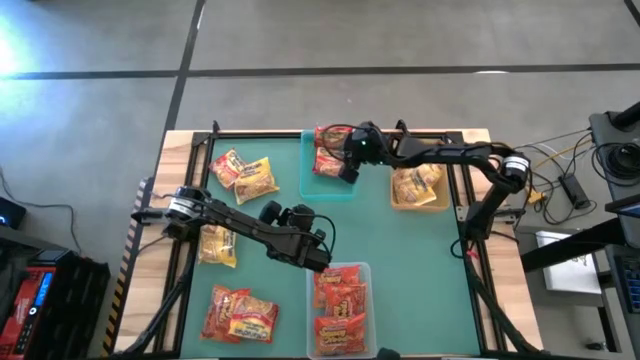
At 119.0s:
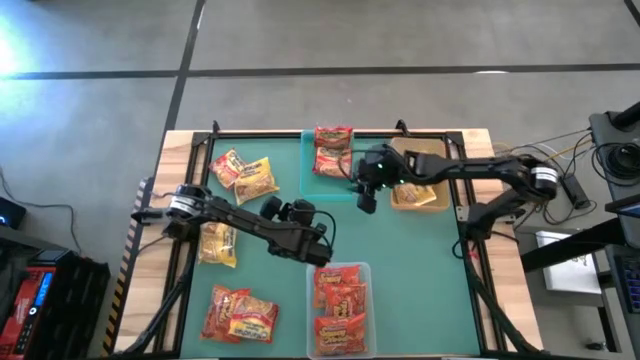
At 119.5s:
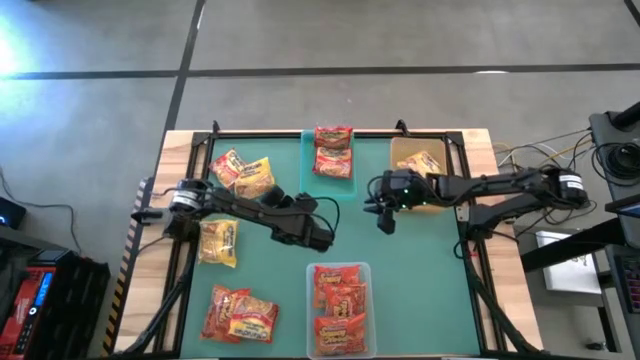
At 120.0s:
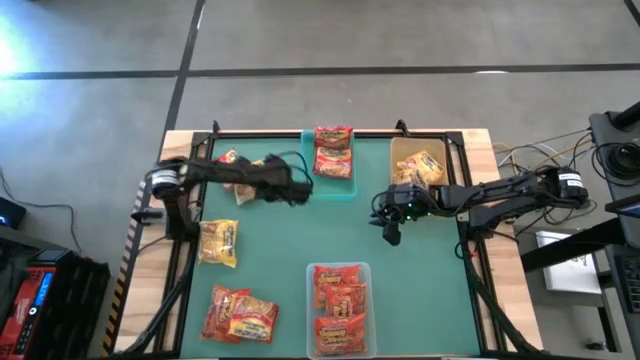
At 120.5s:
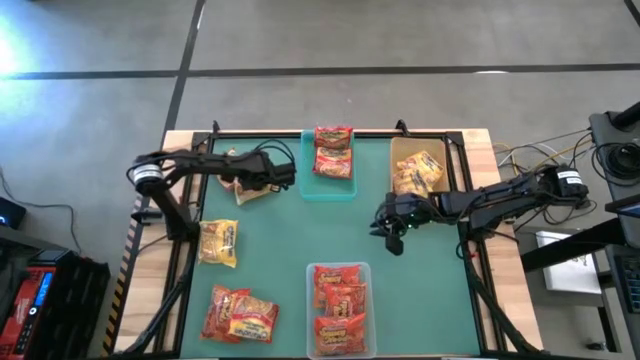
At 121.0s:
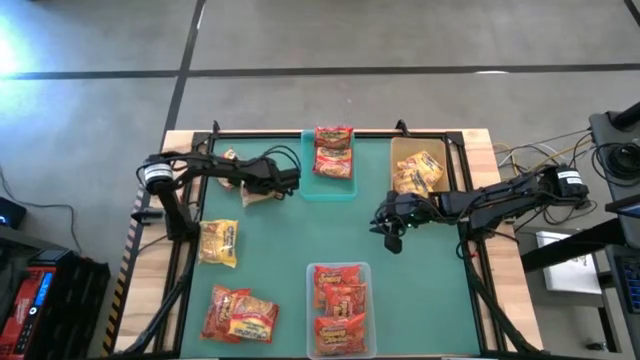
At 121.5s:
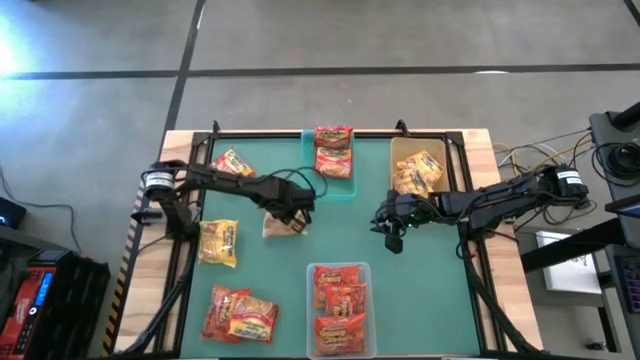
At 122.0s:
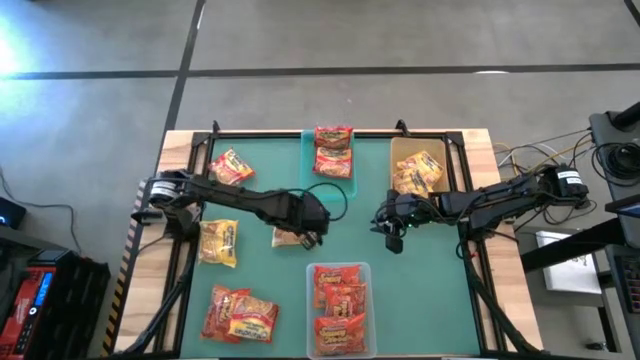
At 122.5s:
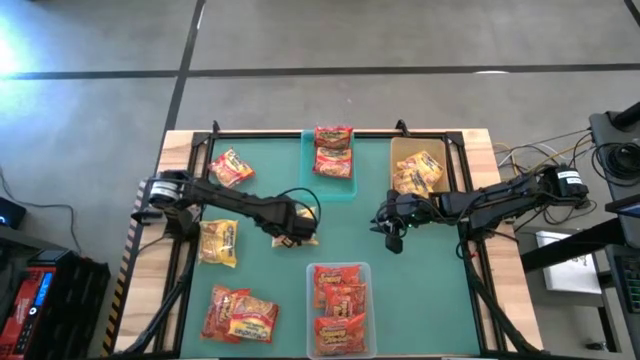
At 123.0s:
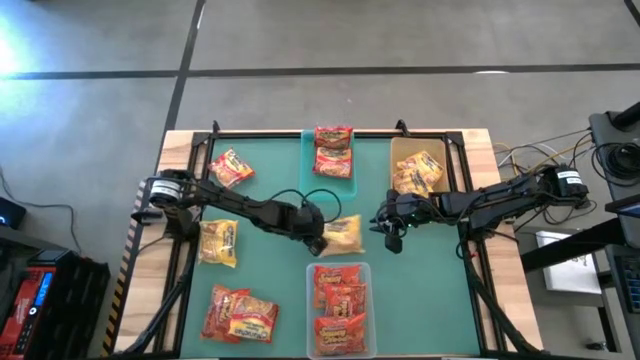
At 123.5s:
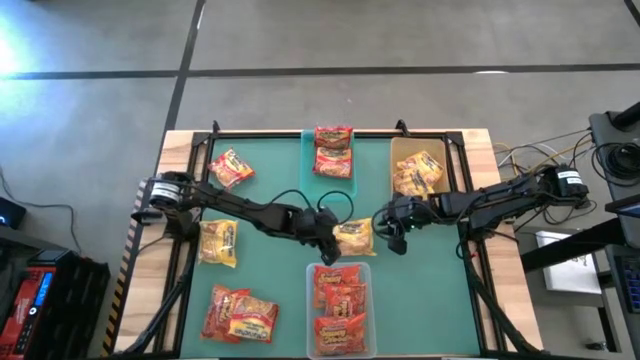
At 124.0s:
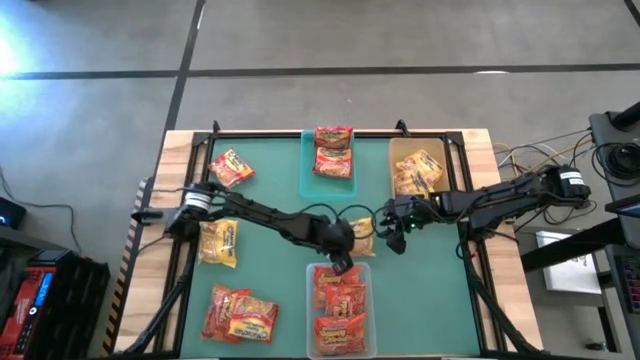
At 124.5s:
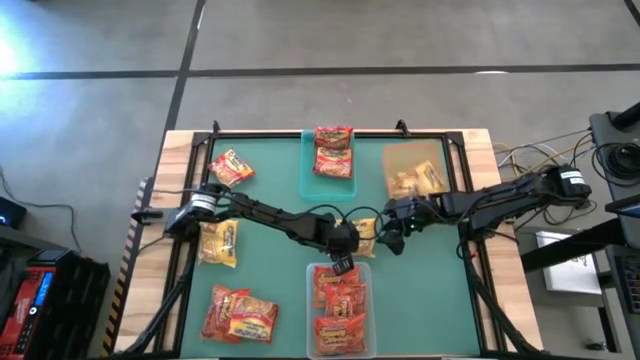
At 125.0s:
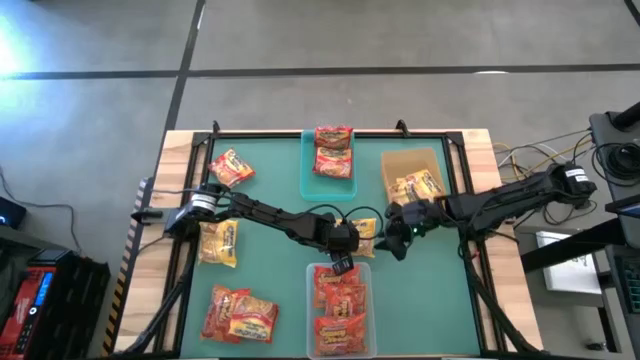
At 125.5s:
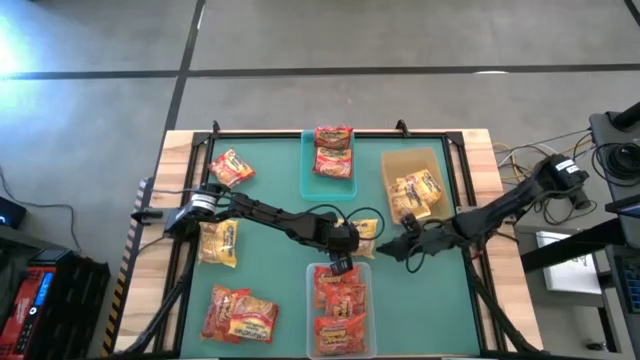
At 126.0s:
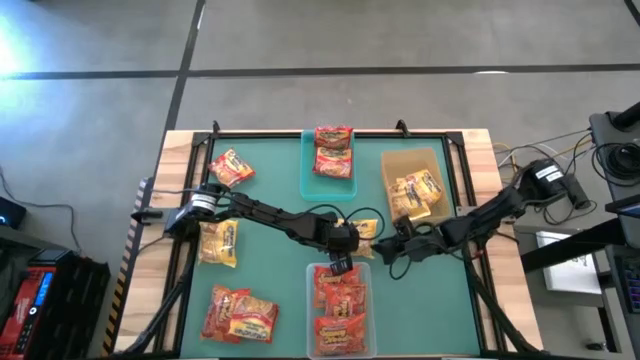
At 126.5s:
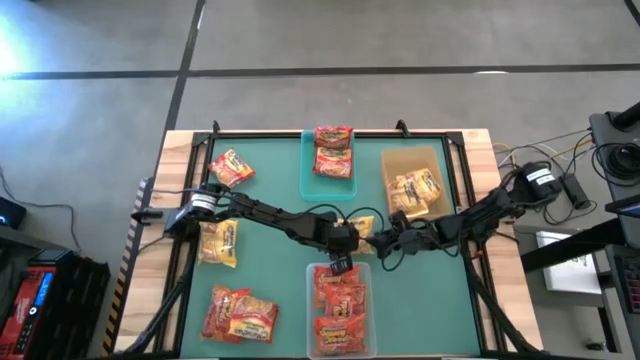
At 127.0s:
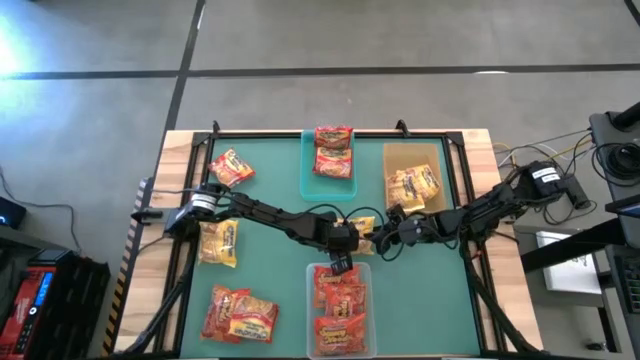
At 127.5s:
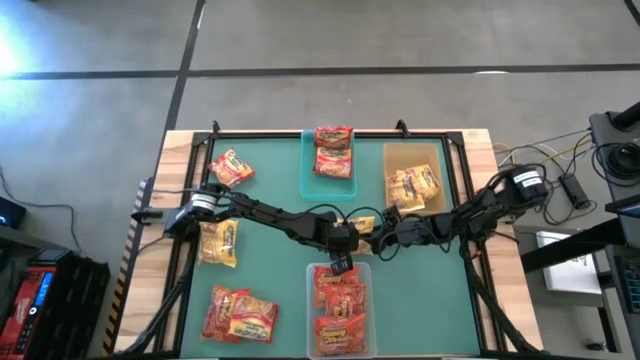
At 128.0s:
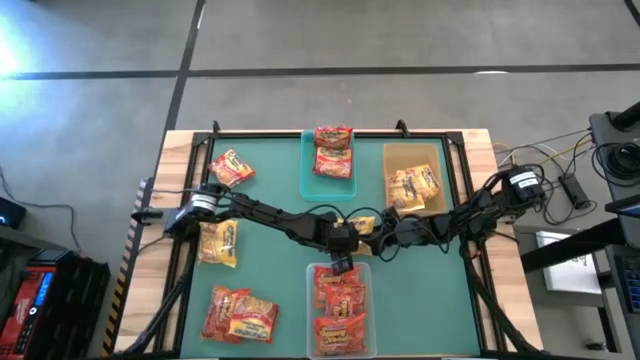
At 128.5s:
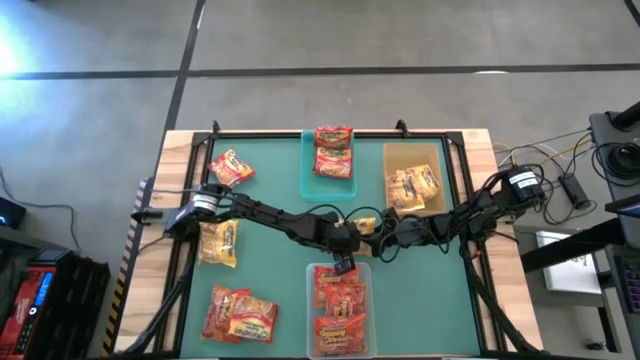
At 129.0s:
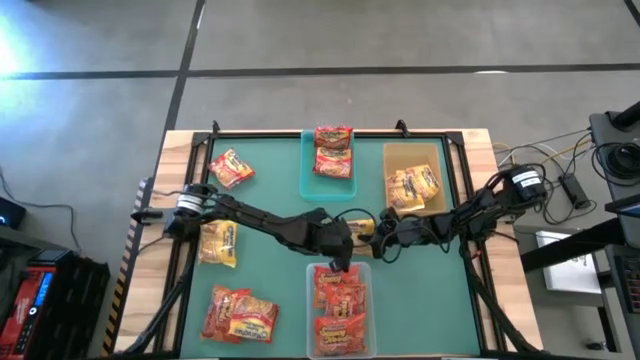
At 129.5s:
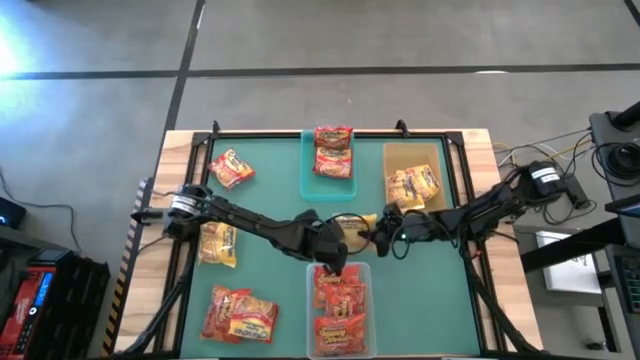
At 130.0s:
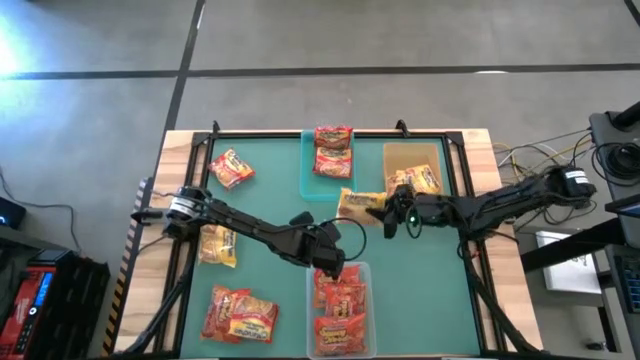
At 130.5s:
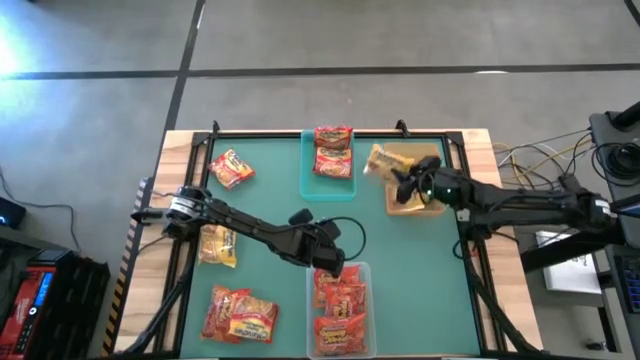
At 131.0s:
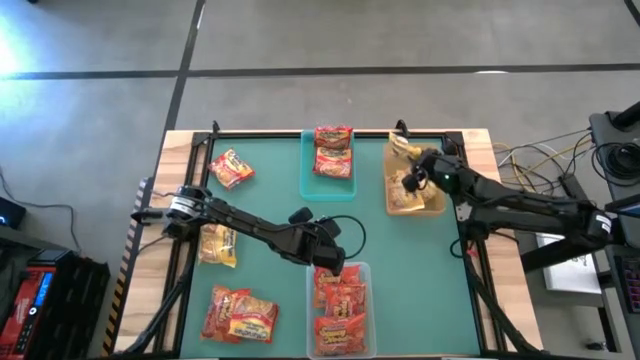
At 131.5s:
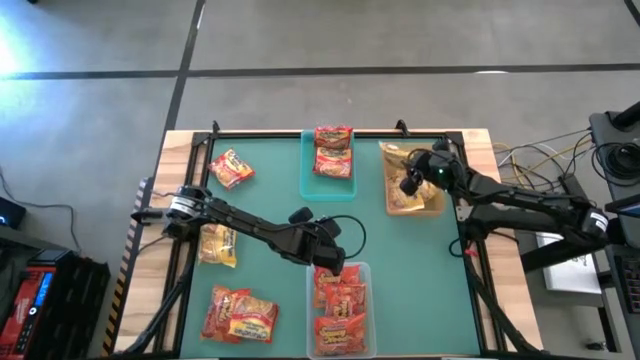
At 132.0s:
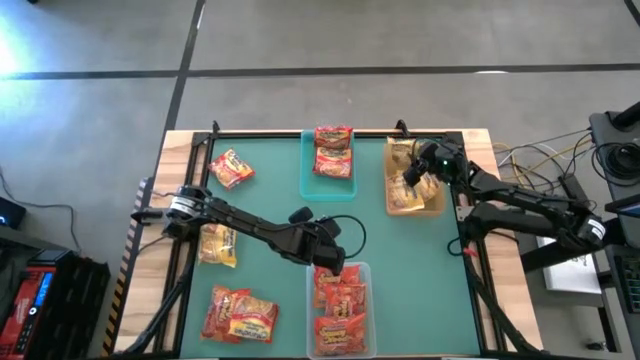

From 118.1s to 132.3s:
Task: Sort Maruchan noodles
Put the top yellow noodle pack into the transparent orange bin

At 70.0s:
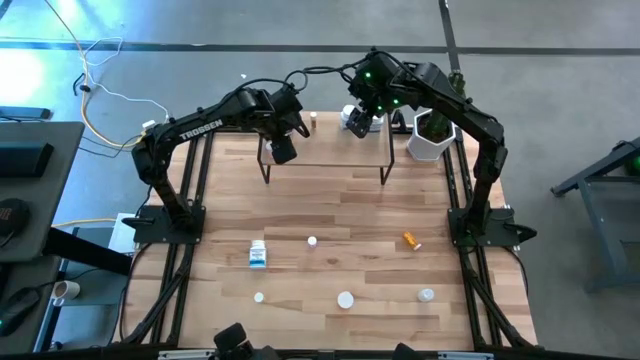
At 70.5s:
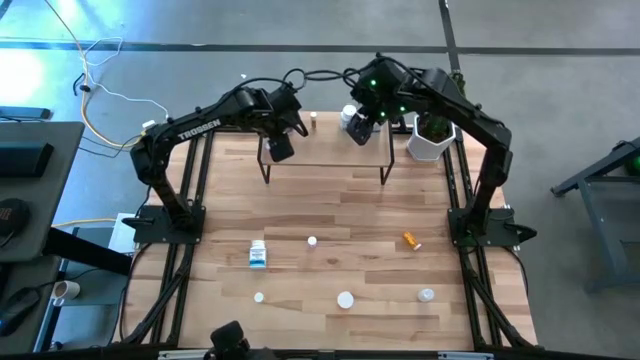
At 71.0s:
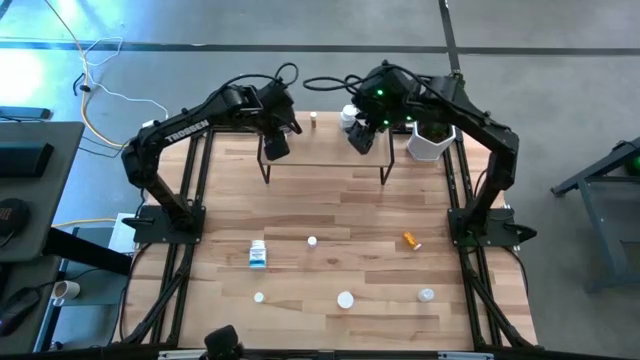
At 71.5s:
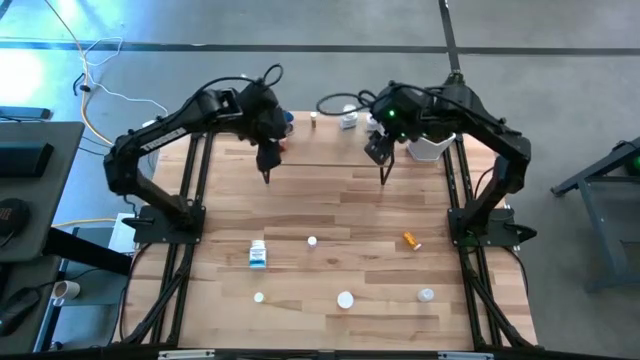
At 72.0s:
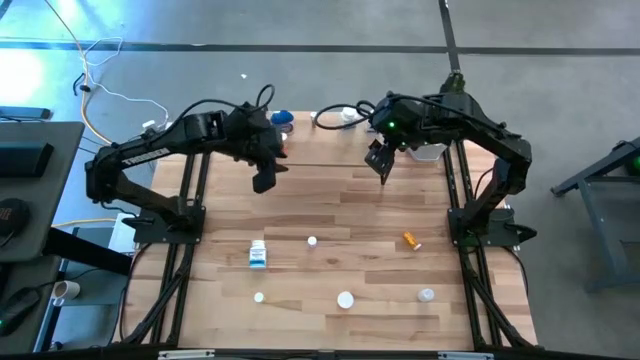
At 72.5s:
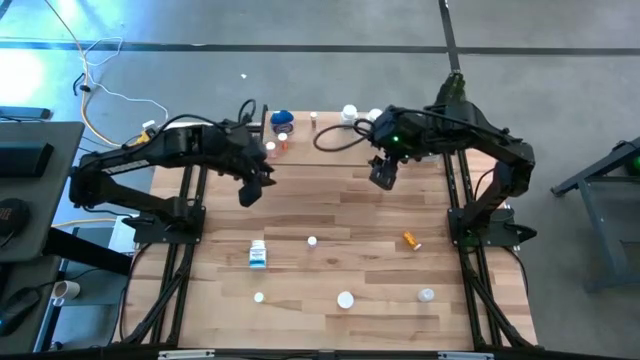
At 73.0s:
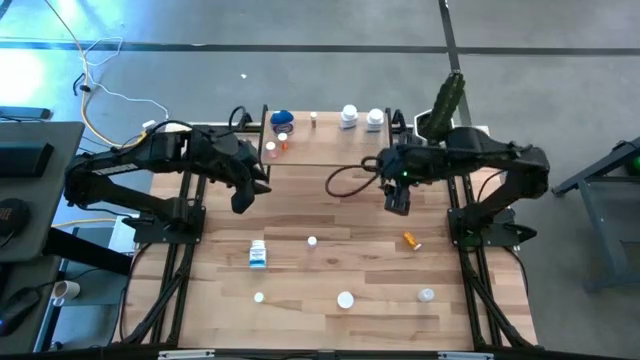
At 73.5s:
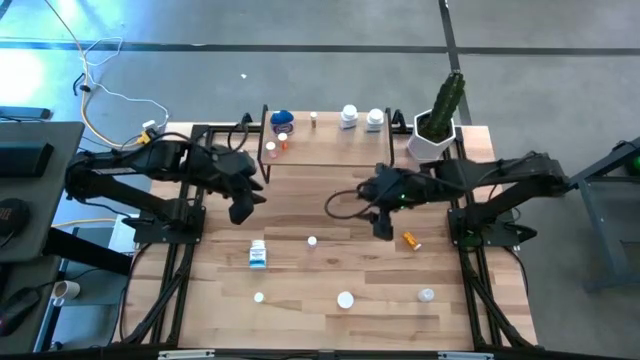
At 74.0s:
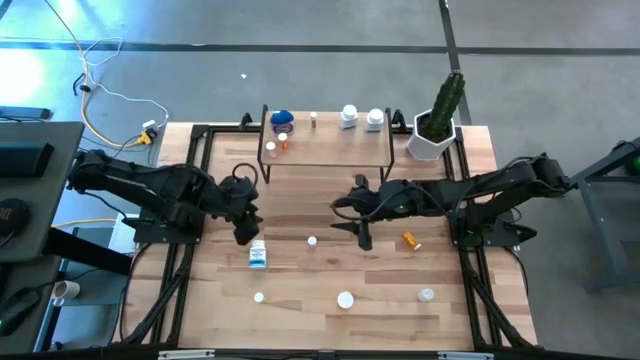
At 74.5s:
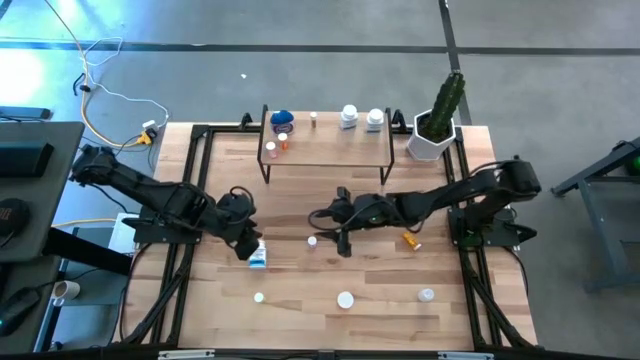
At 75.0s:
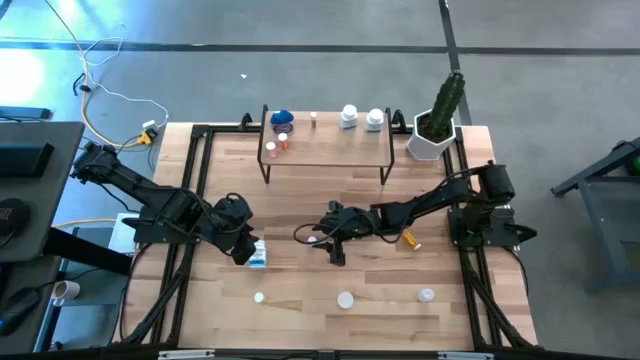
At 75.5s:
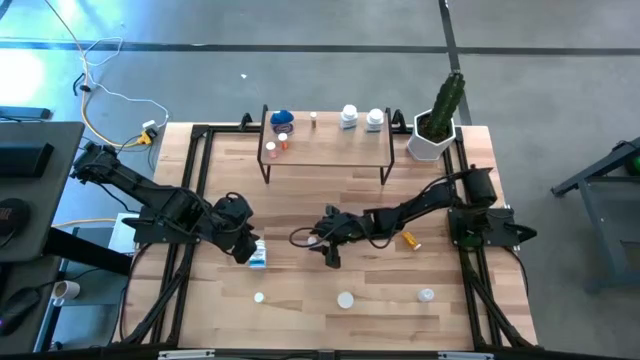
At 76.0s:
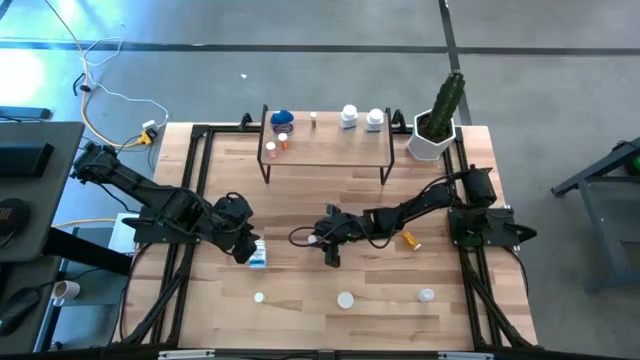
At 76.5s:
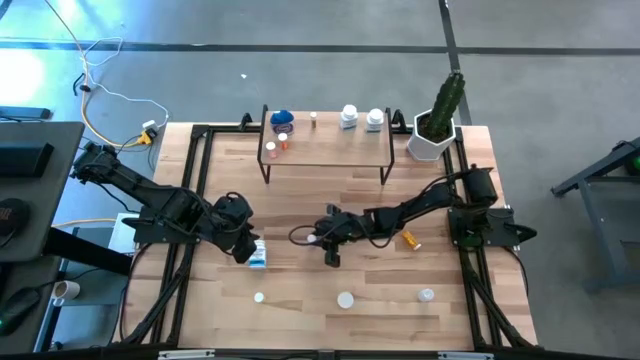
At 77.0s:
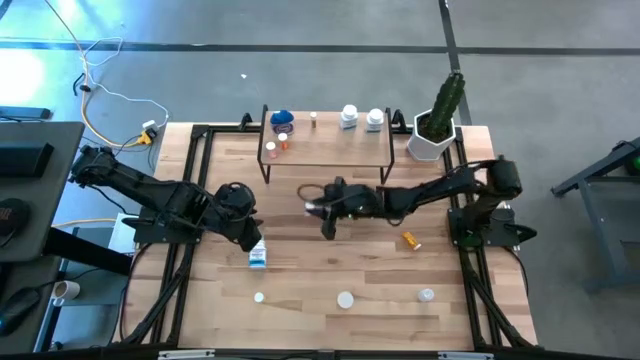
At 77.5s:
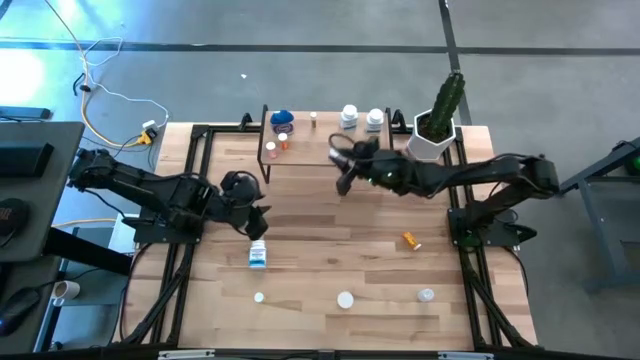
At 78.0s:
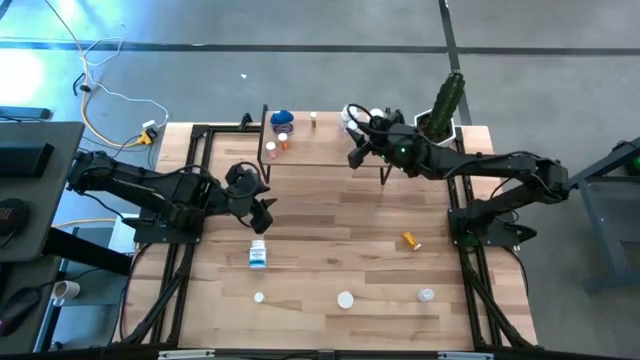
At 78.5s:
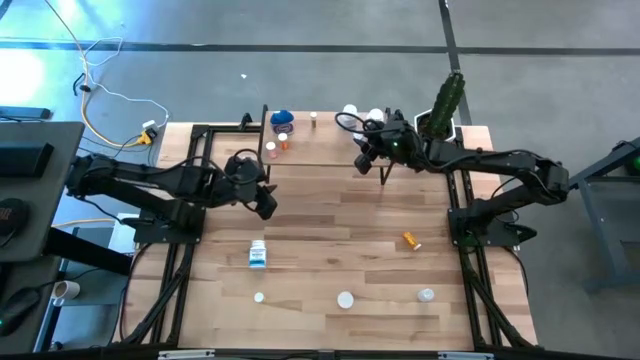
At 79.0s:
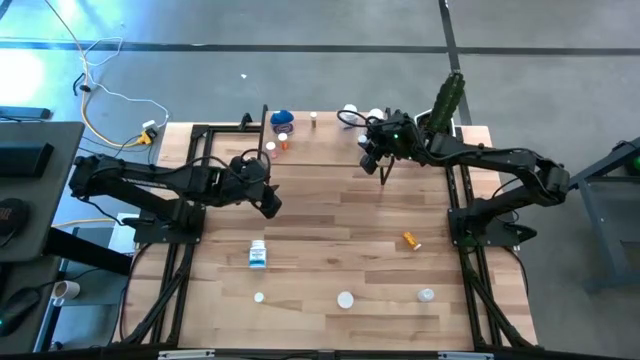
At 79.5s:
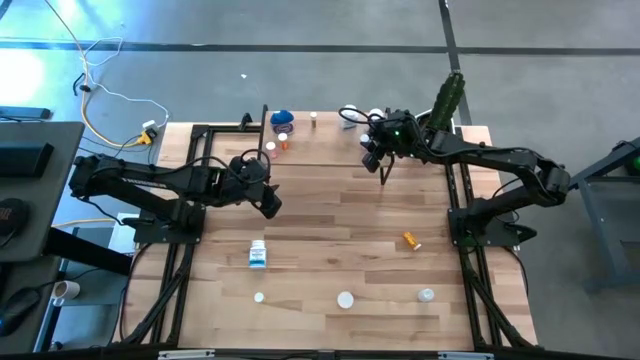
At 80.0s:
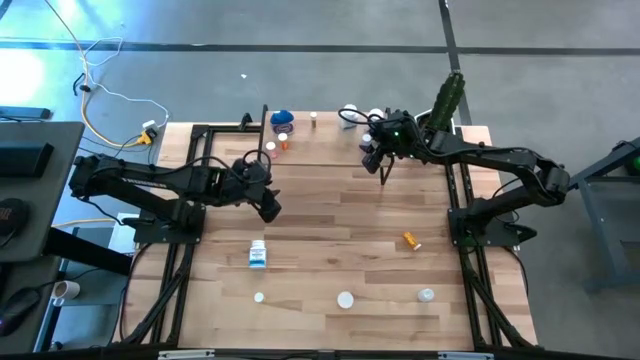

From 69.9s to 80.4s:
Task: Pick and place medicine bottles onto shelf by color
Put the pink pill bottle on the shelf
